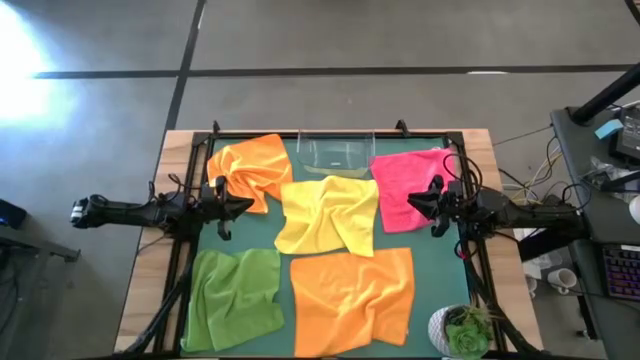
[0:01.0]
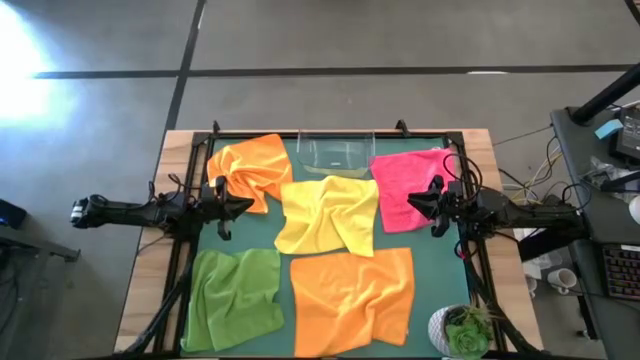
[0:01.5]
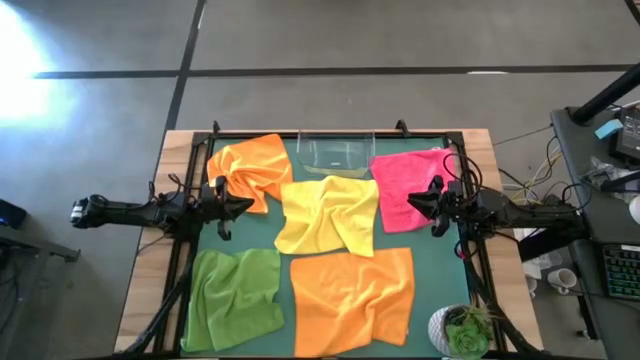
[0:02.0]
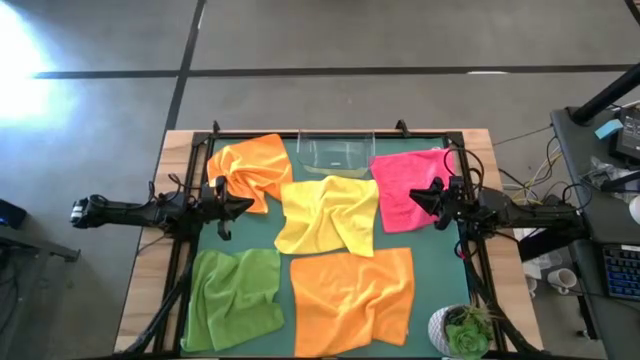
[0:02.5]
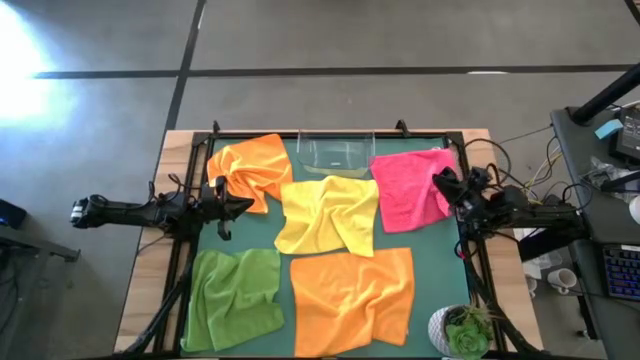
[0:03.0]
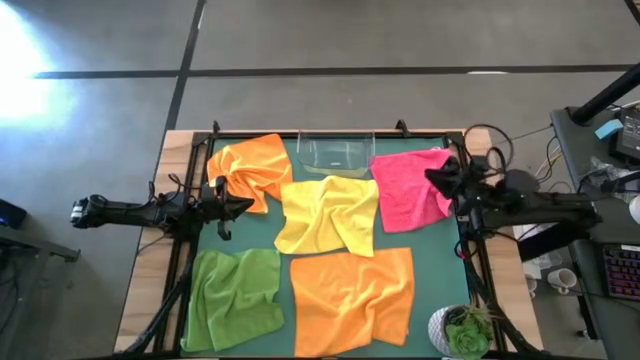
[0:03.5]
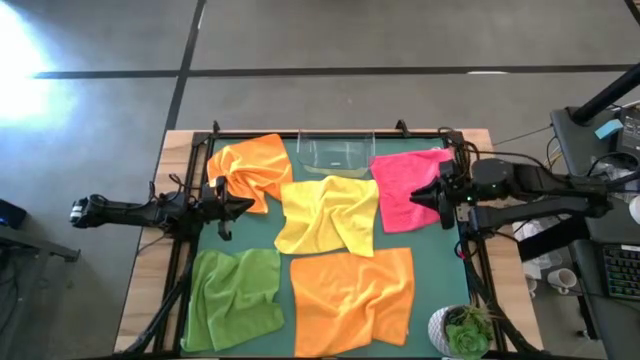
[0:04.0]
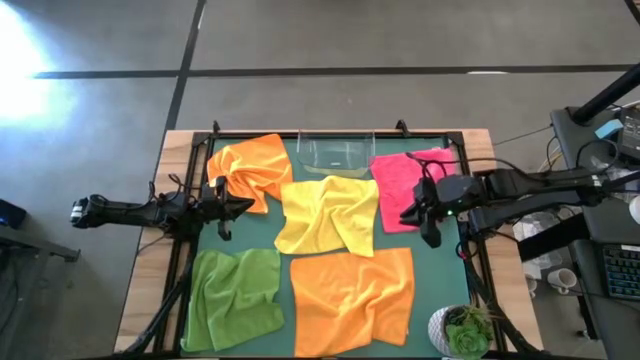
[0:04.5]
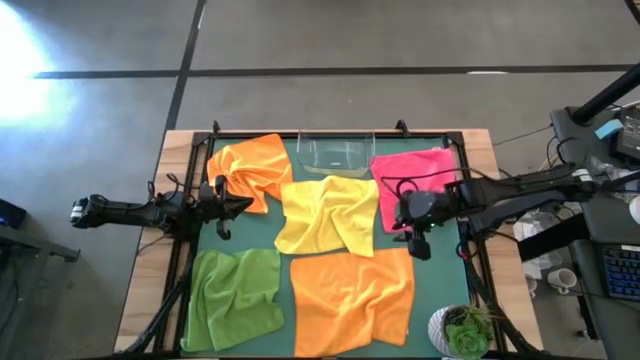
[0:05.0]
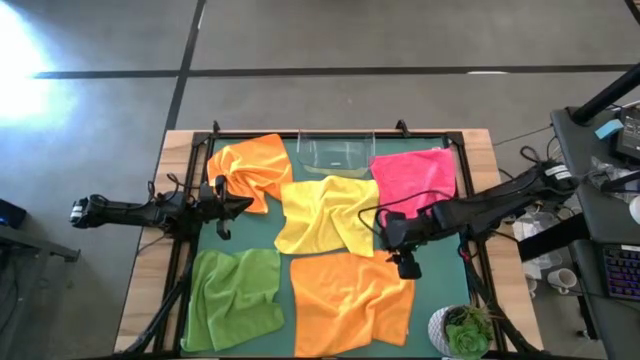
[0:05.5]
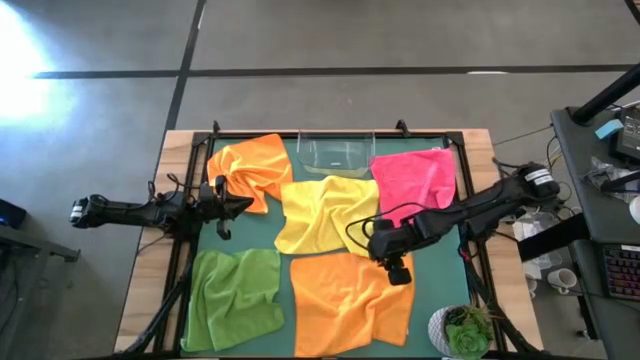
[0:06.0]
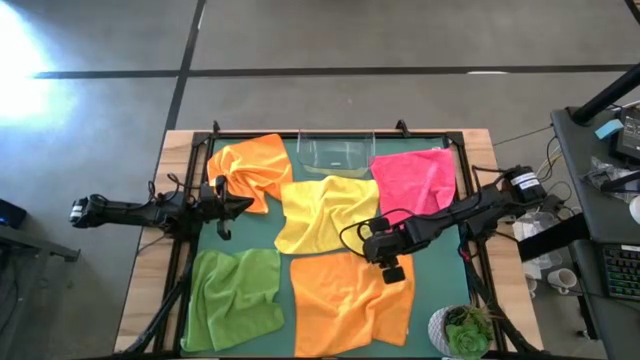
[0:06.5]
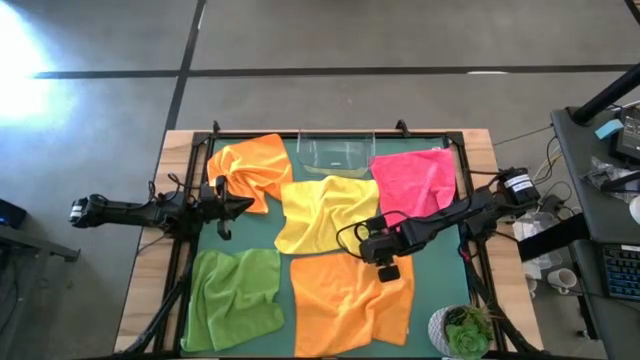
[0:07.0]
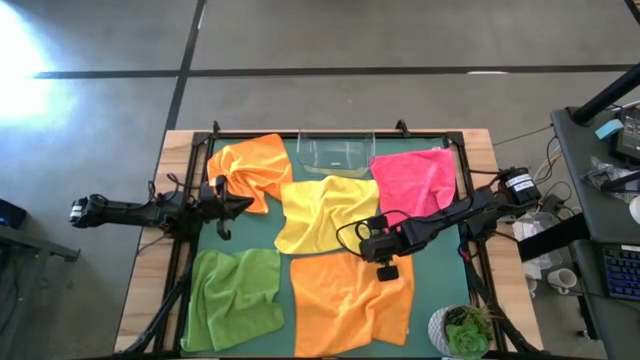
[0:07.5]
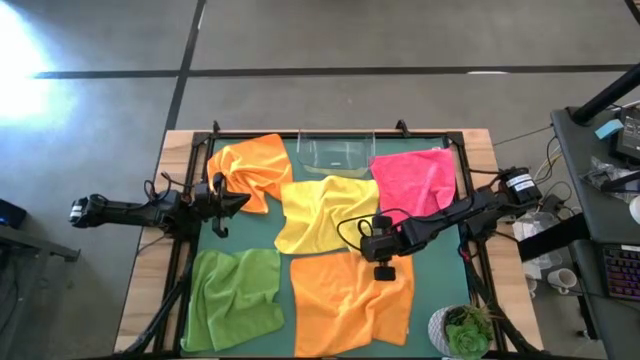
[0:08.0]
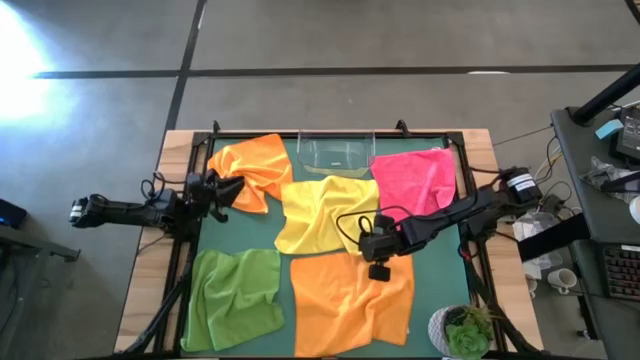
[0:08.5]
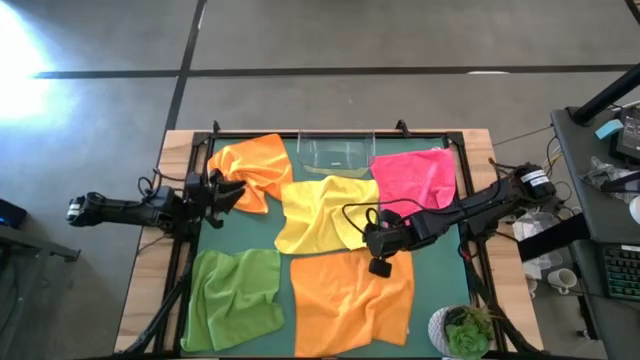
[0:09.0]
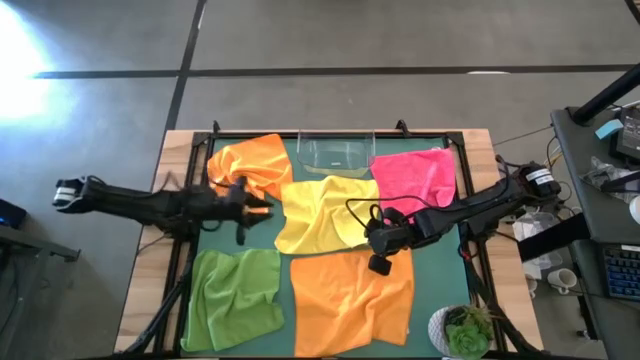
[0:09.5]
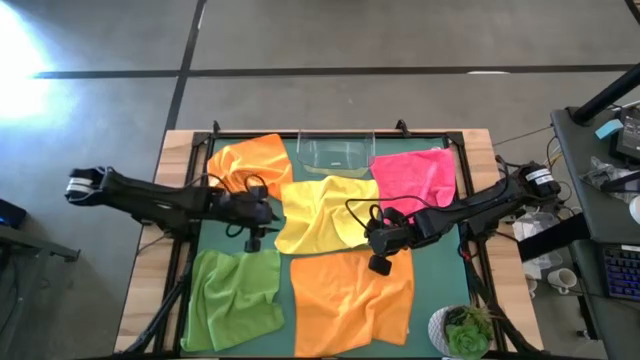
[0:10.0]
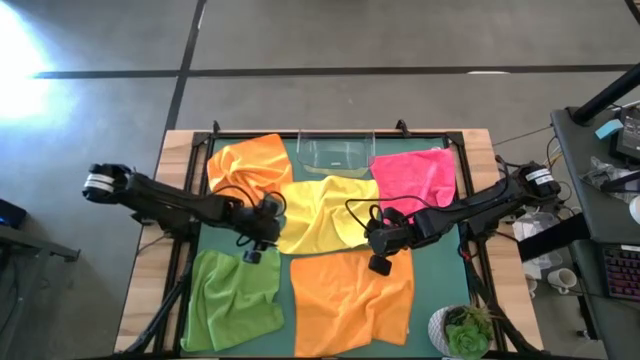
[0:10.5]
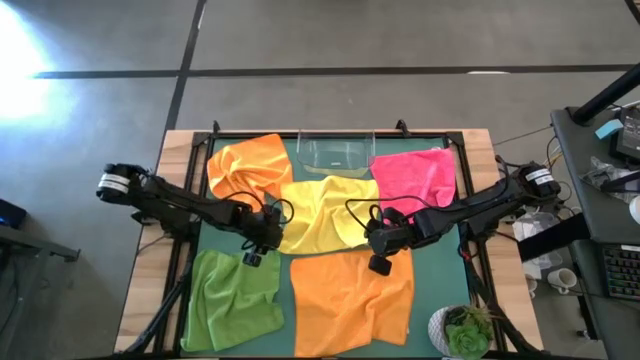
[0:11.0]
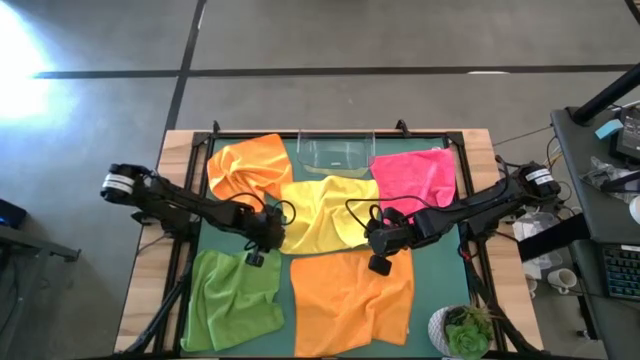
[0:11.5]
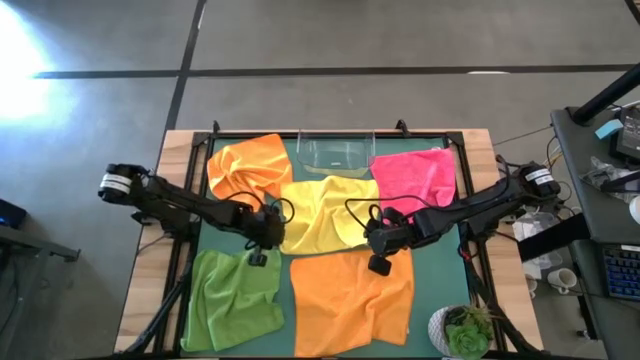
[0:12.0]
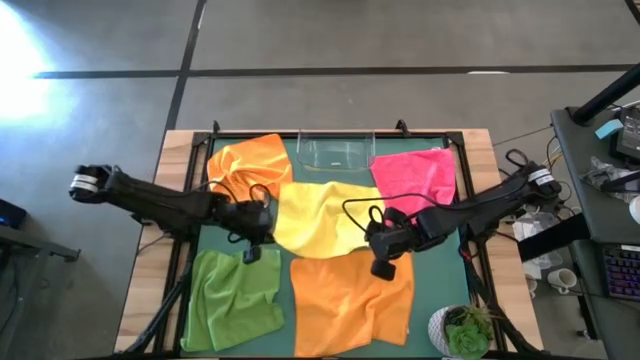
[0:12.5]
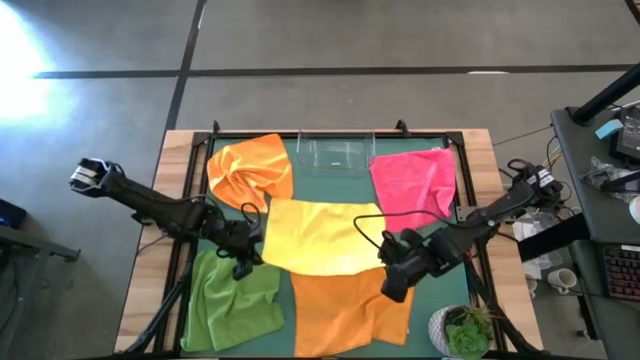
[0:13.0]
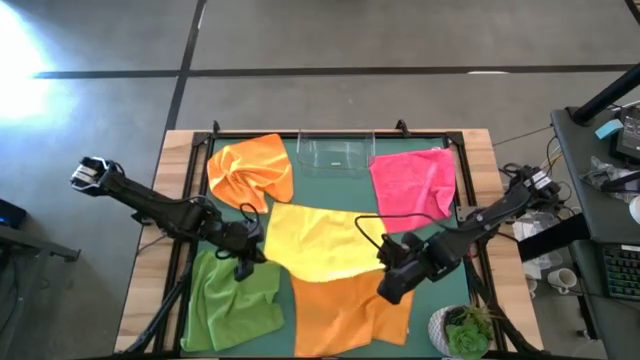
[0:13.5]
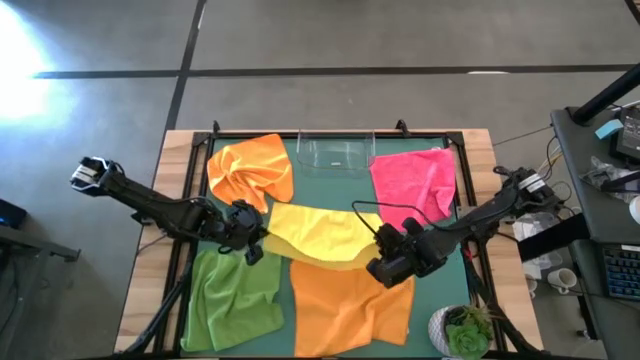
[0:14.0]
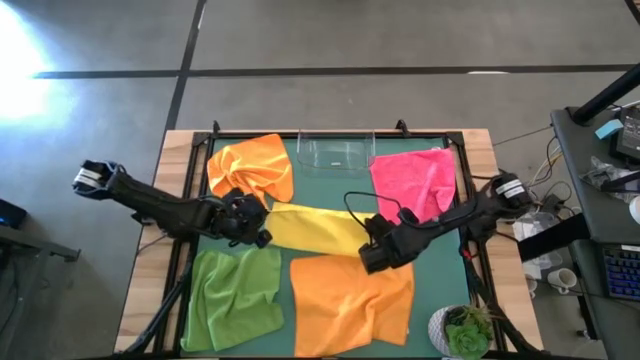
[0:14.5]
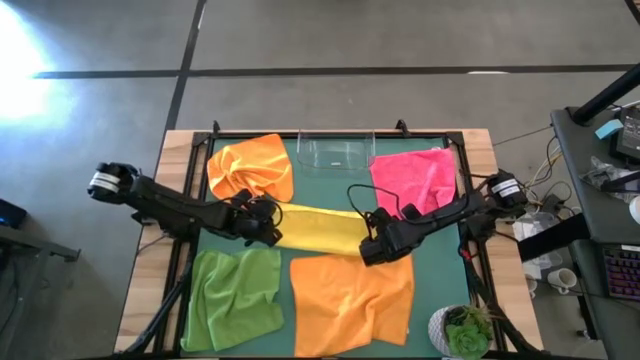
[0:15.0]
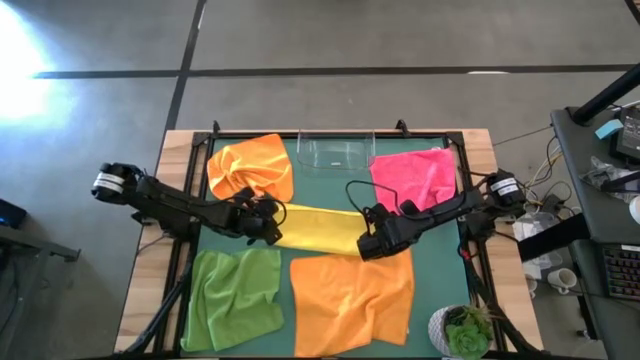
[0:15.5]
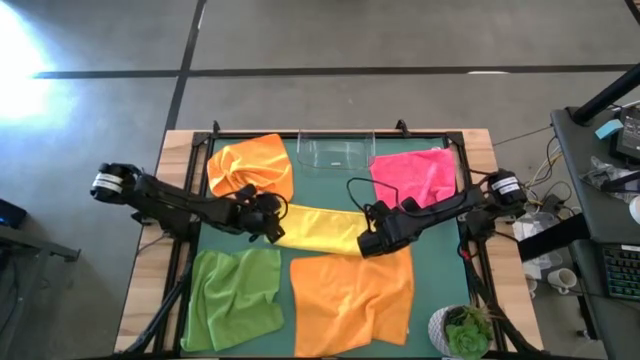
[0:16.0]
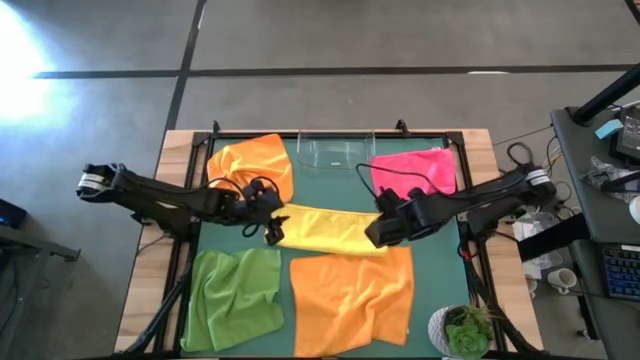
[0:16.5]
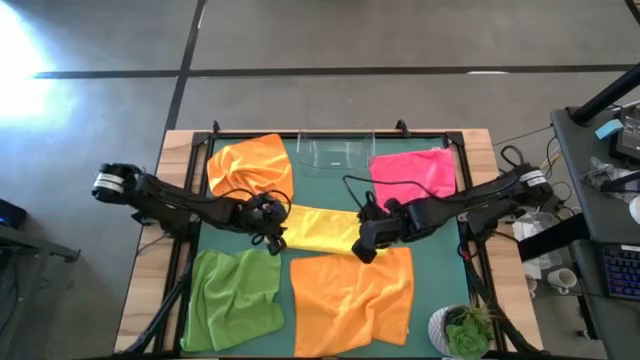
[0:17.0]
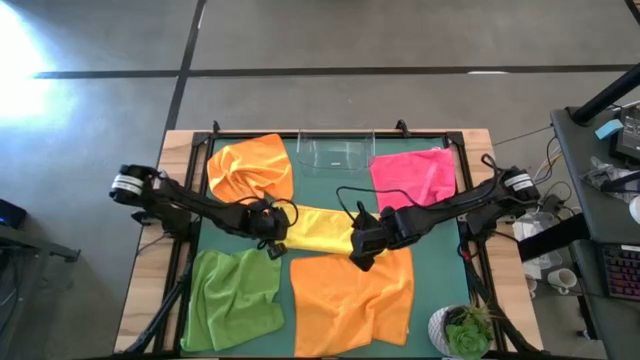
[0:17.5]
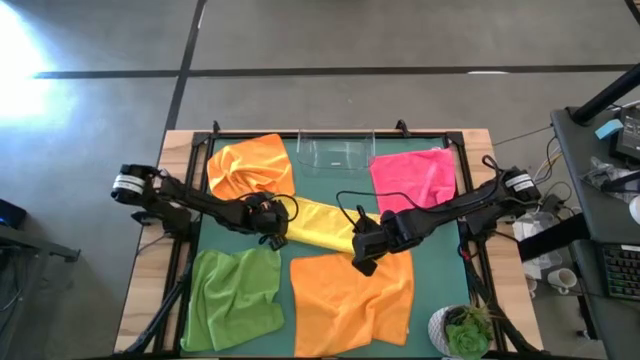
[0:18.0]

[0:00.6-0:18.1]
Task: Fold microfiber towels
Fold the yellow microfiber towel

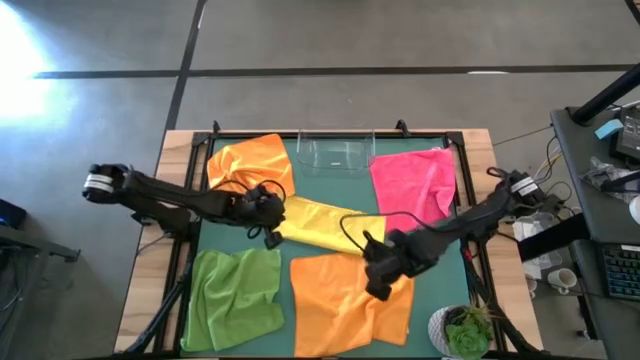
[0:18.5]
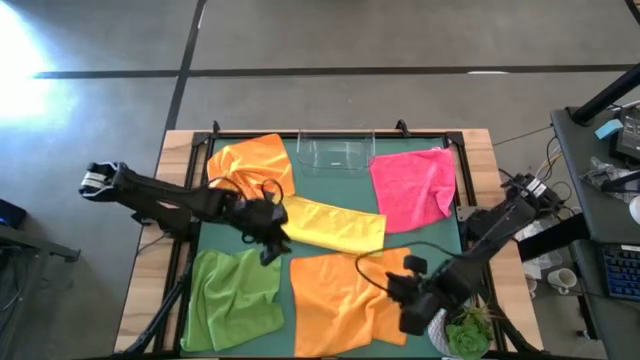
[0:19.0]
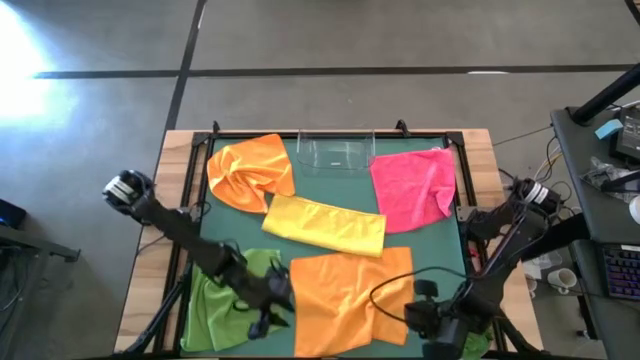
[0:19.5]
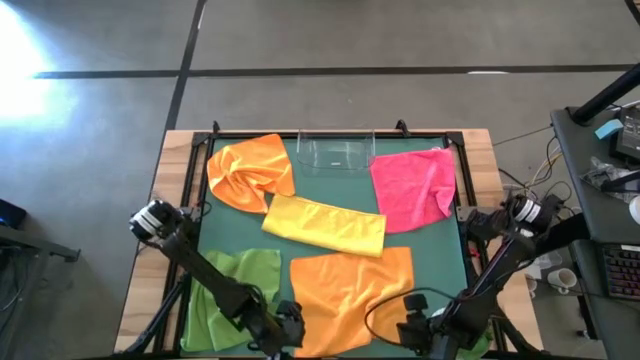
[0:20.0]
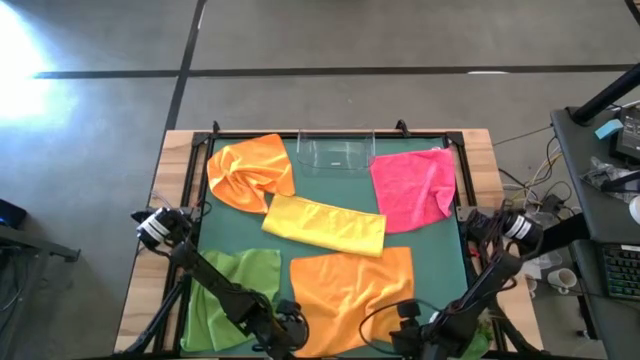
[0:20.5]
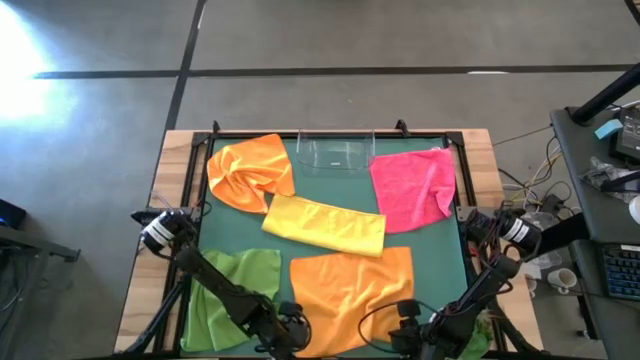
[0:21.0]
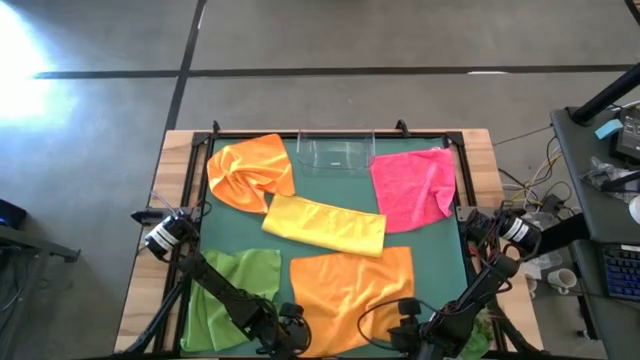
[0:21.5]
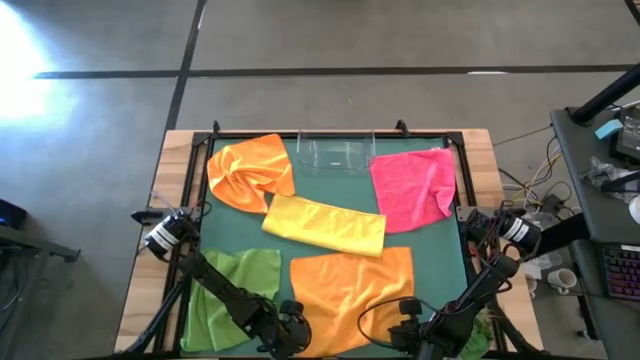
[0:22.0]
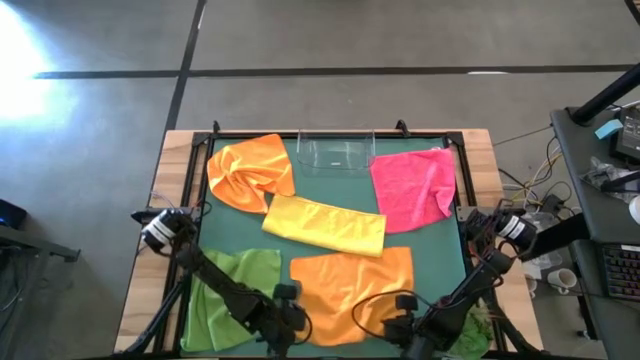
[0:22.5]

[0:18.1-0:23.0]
Fold the bottom orange microfiber cloth
